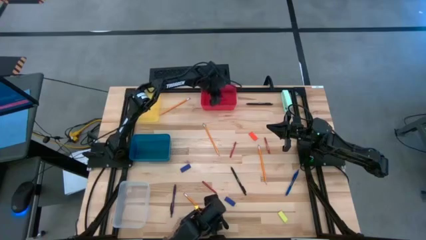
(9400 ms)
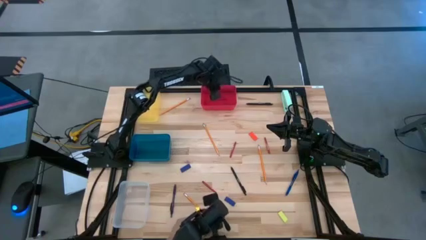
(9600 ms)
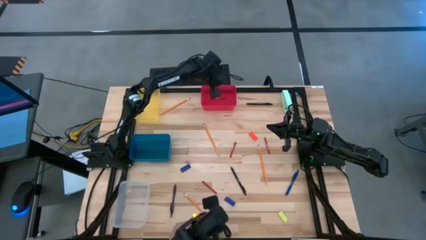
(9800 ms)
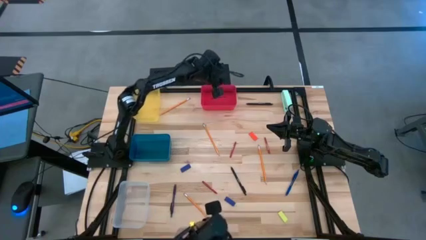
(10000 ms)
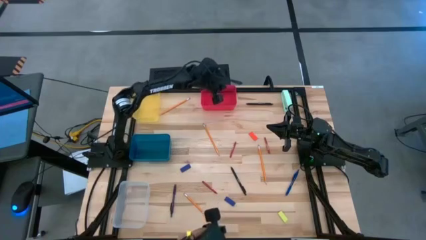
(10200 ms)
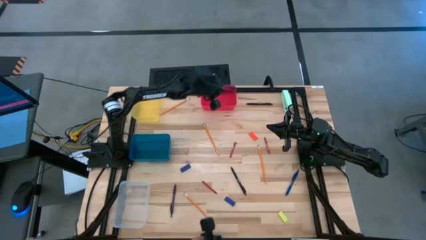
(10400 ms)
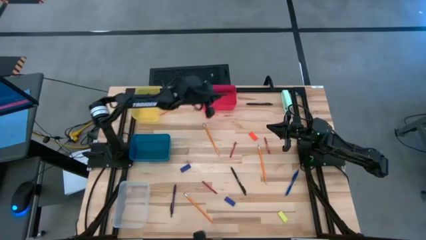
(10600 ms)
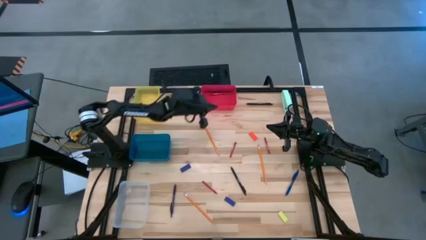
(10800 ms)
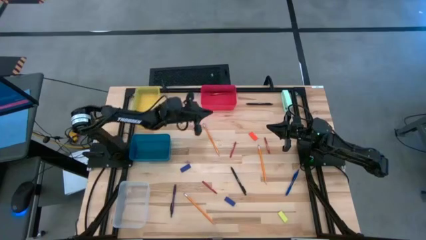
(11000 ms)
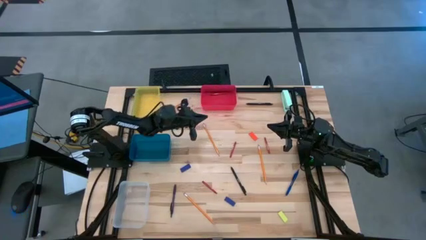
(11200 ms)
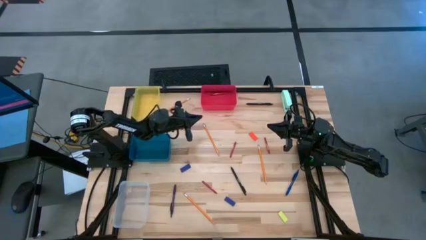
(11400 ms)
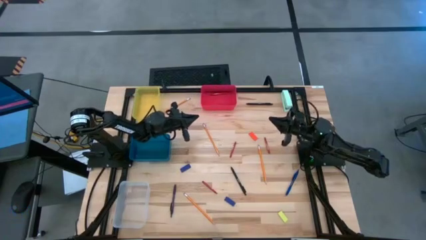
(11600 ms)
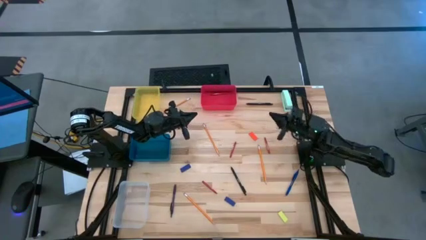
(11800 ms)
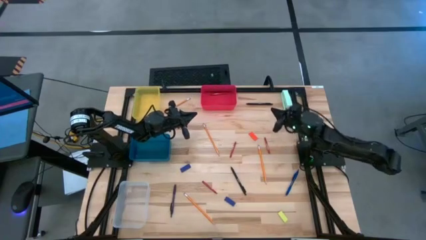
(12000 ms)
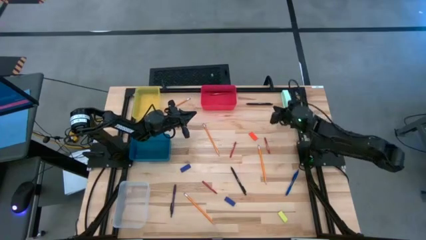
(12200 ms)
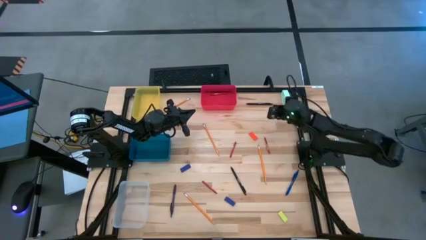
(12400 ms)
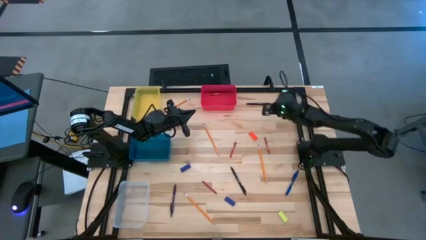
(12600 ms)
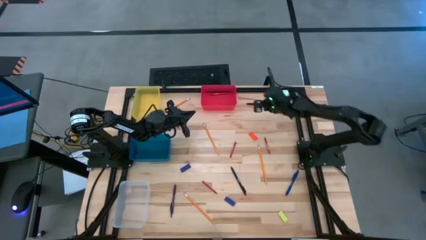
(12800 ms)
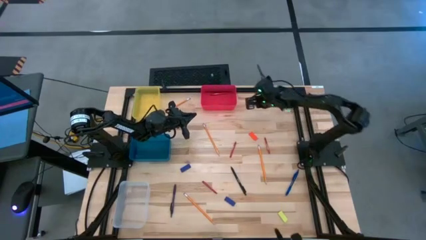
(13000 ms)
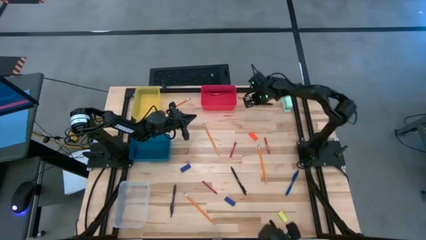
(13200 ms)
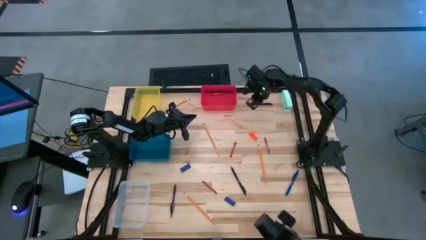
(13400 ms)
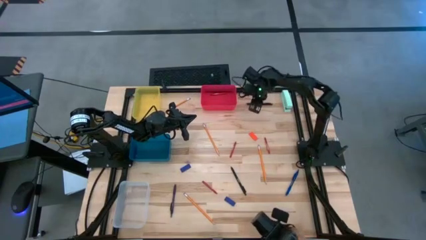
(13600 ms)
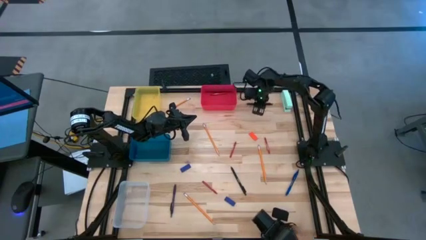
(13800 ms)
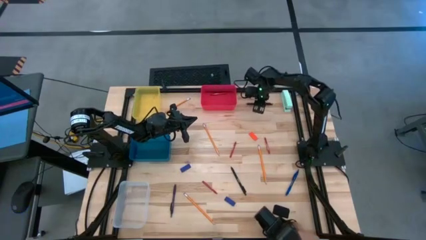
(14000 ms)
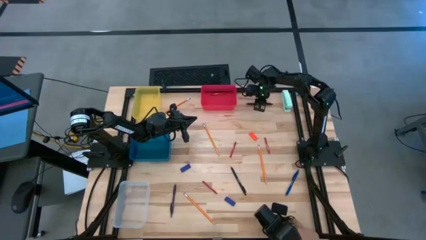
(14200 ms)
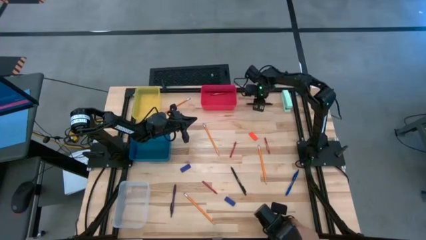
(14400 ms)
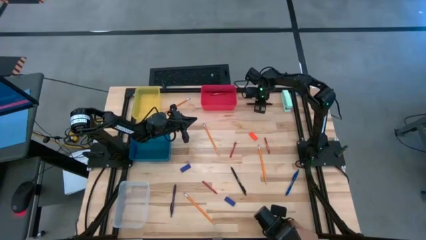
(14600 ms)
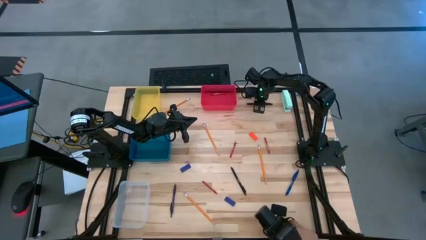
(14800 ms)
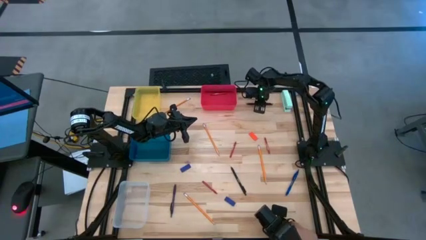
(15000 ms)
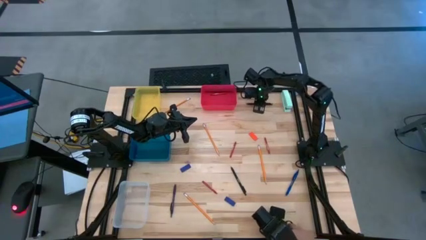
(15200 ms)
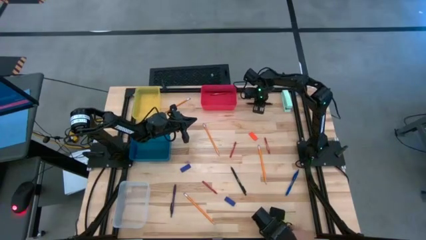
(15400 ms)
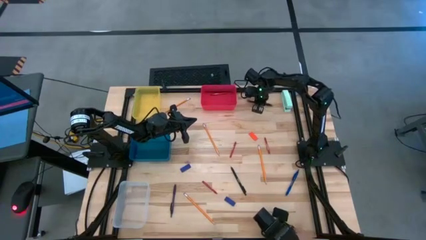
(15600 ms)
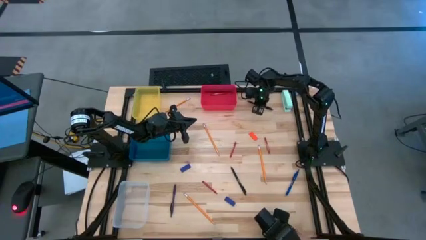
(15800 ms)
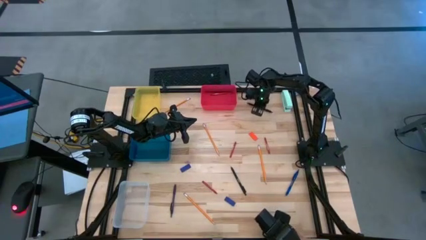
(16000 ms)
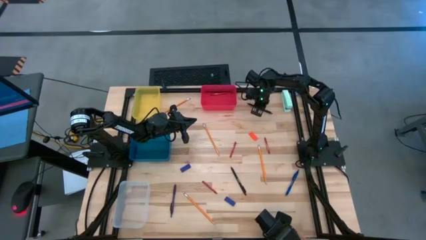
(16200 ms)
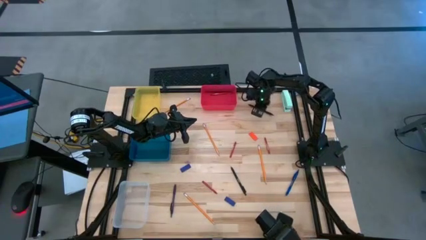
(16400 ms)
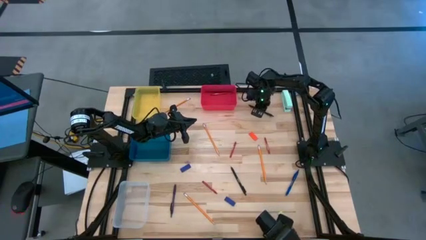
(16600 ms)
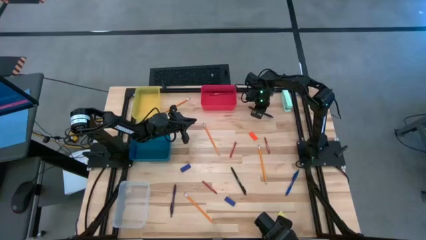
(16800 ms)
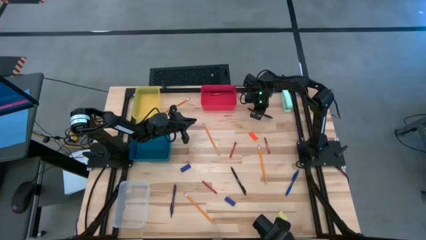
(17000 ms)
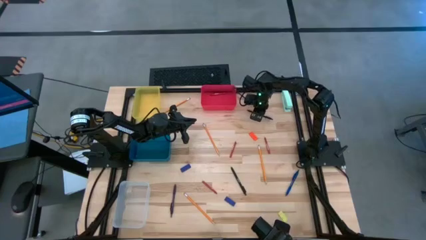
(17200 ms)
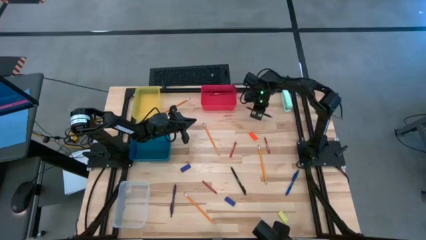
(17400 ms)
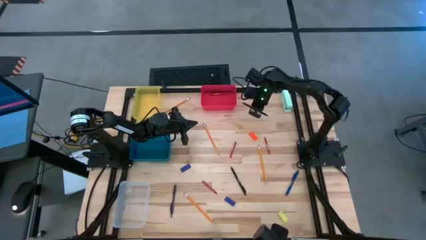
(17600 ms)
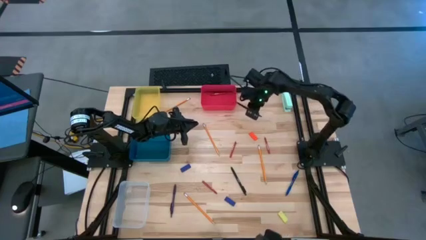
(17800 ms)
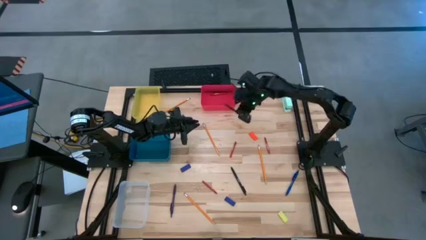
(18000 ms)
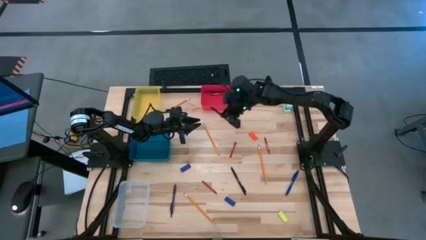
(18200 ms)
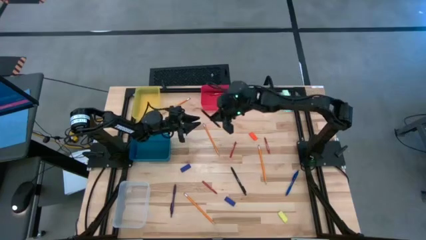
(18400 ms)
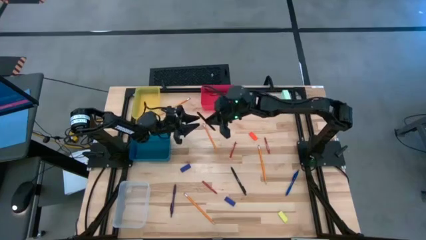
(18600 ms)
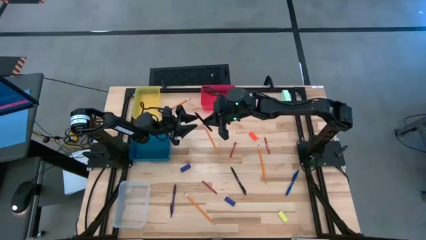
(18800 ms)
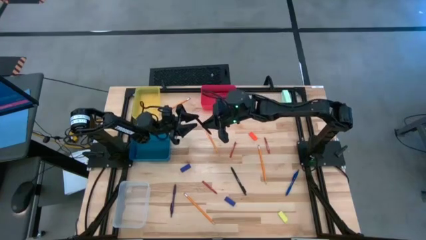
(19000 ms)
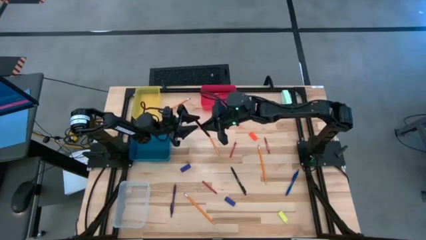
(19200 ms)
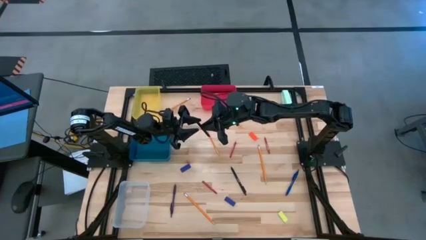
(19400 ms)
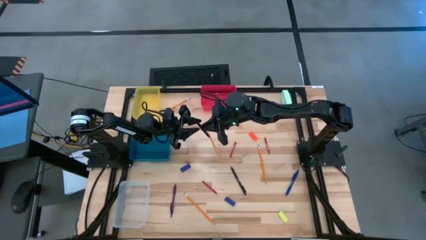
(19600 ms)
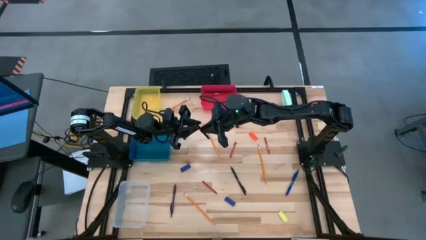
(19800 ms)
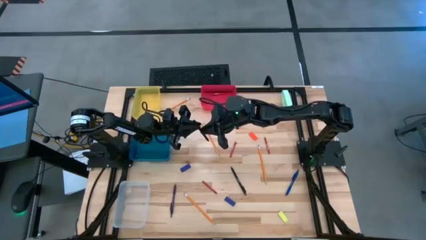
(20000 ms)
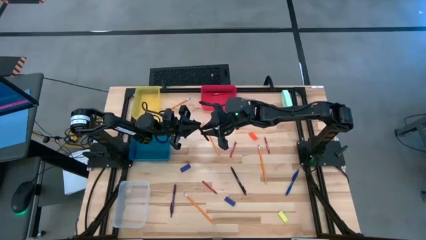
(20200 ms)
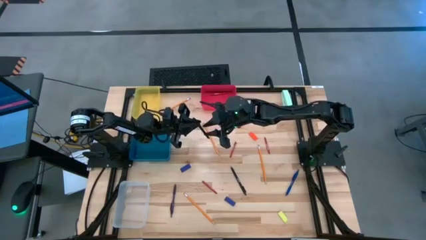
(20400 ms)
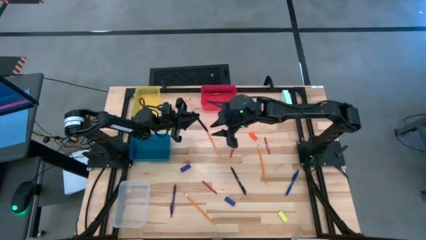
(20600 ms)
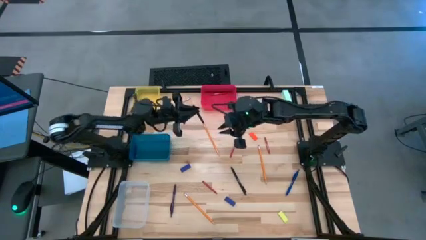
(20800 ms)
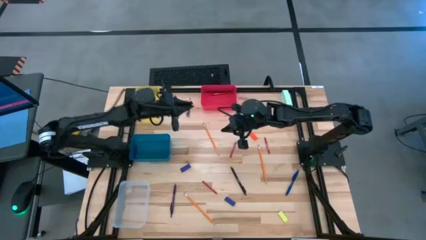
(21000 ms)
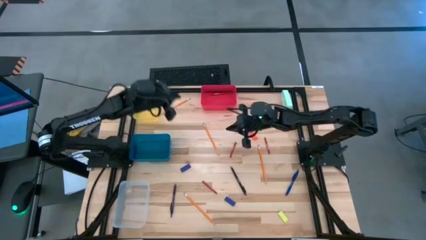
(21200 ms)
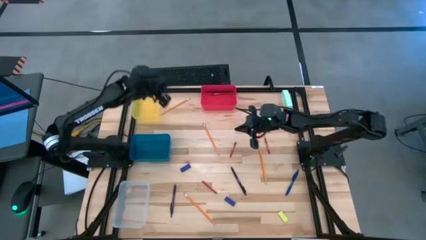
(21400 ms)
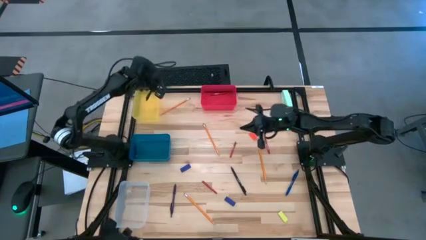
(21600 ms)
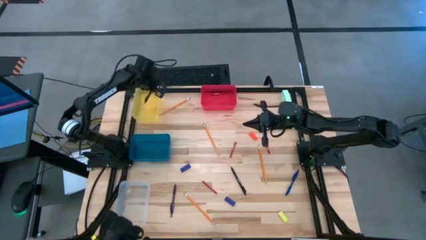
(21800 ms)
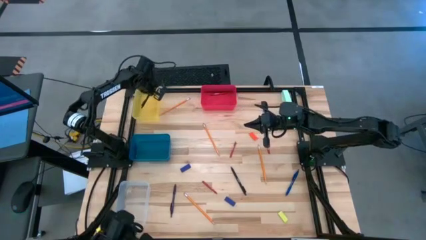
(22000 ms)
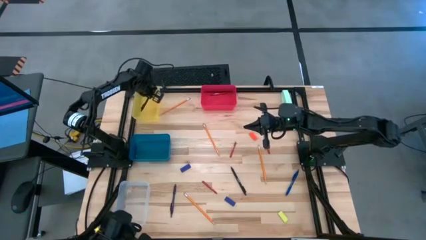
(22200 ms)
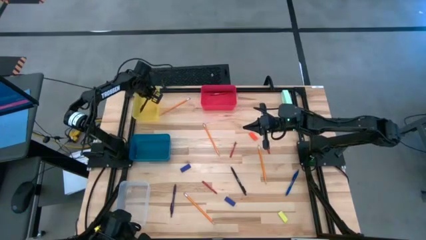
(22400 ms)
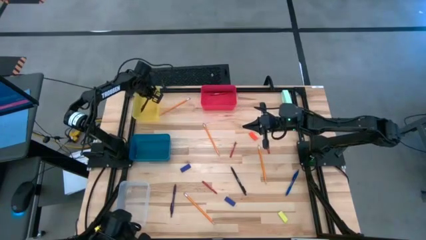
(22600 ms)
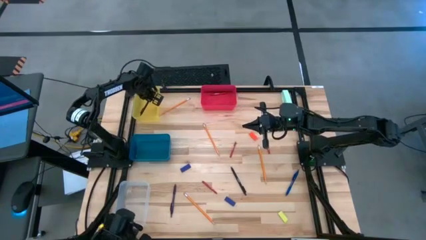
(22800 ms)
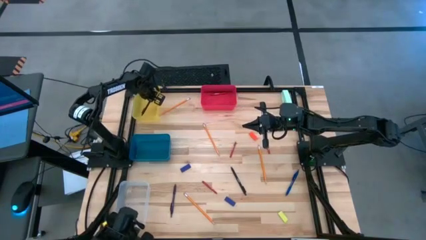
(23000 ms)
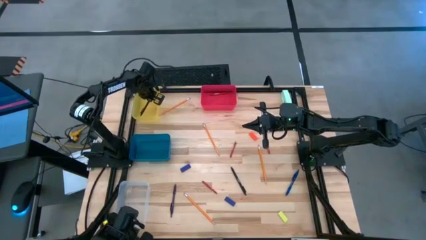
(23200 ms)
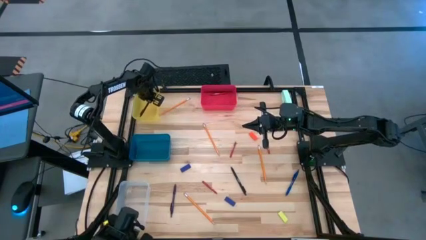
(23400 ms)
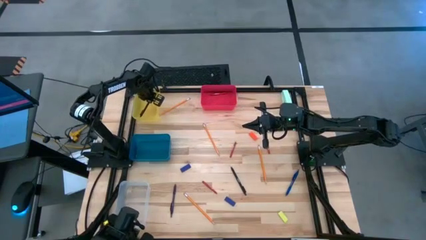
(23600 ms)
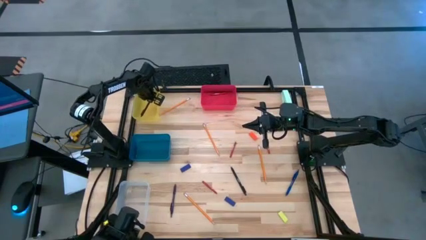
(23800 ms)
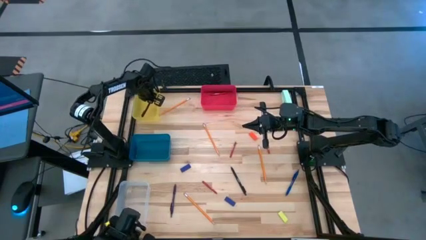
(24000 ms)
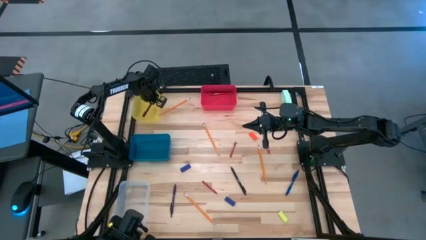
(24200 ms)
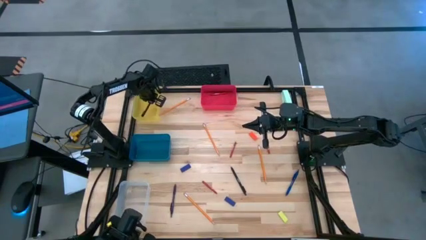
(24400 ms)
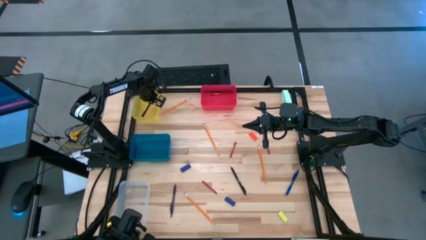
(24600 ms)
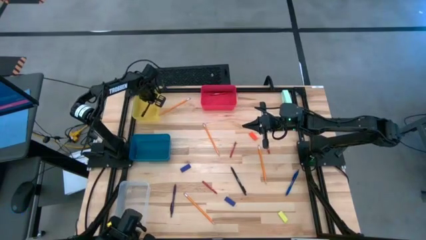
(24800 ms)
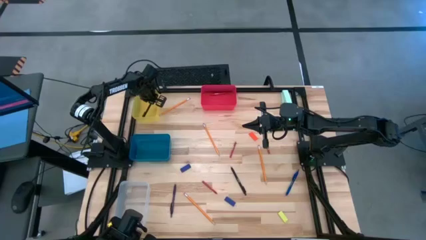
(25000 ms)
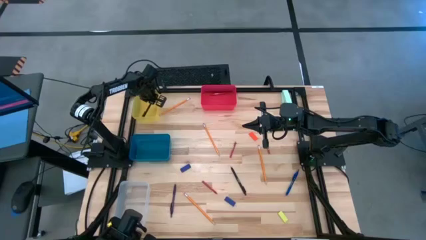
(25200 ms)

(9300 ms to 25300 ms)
Task: Sort crayons/erasers/pens/pencils in bins
Put the black pen into the yellow bin
